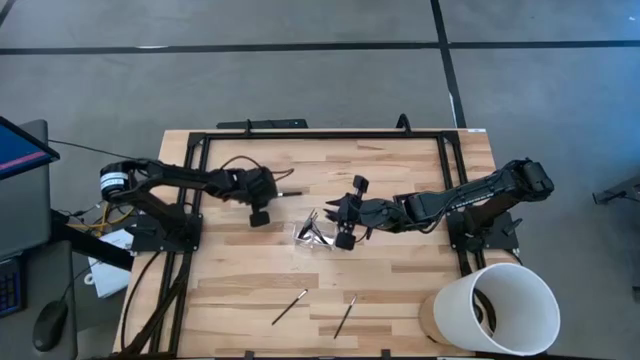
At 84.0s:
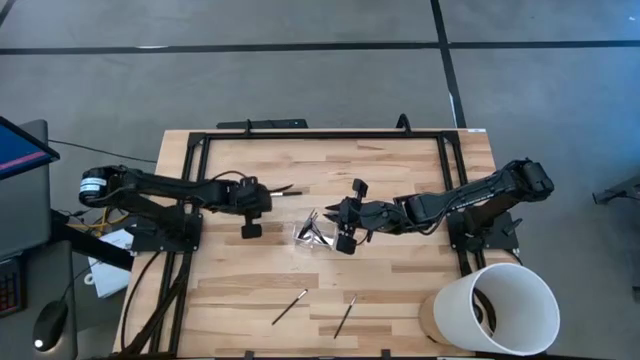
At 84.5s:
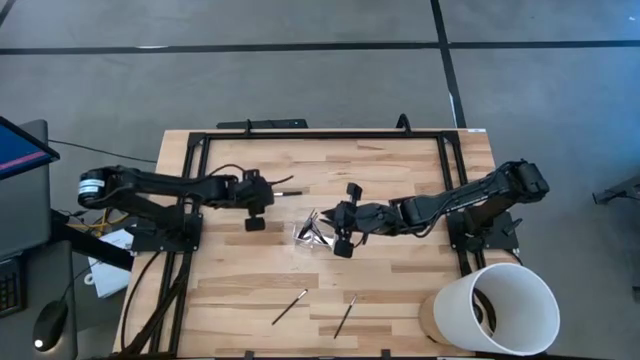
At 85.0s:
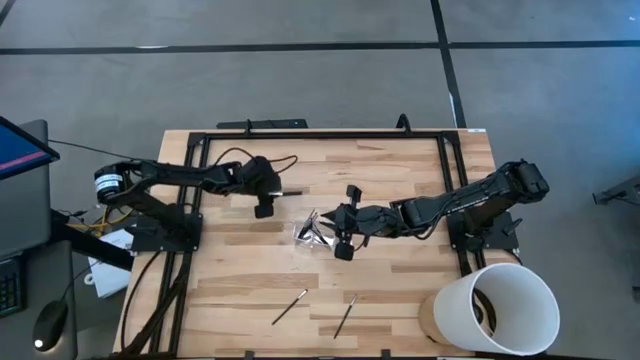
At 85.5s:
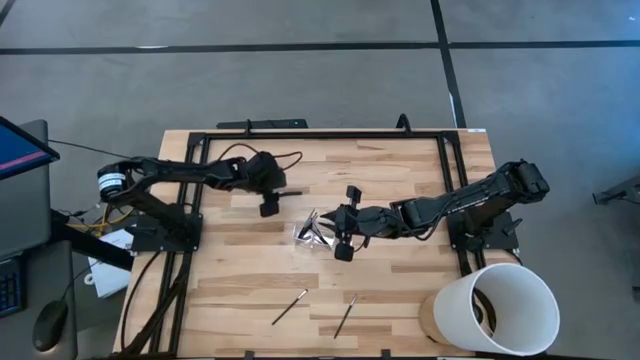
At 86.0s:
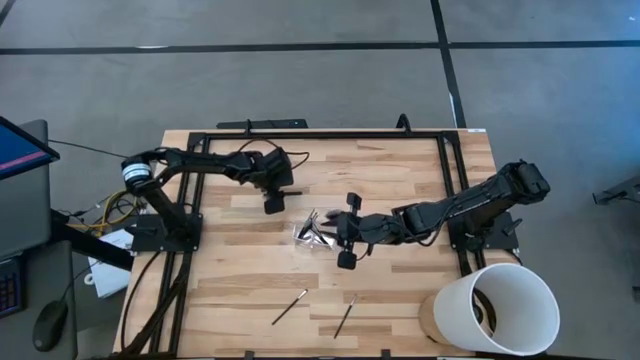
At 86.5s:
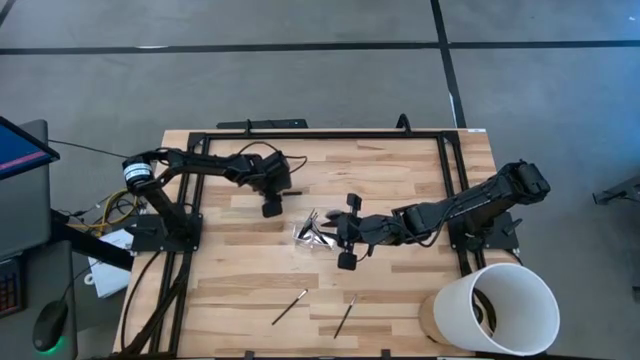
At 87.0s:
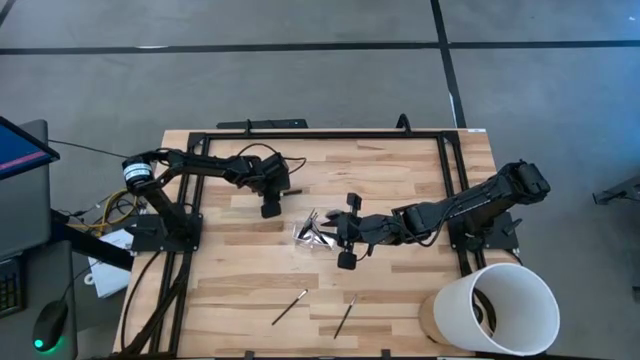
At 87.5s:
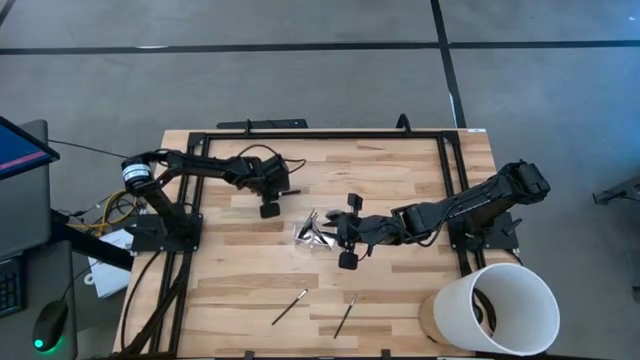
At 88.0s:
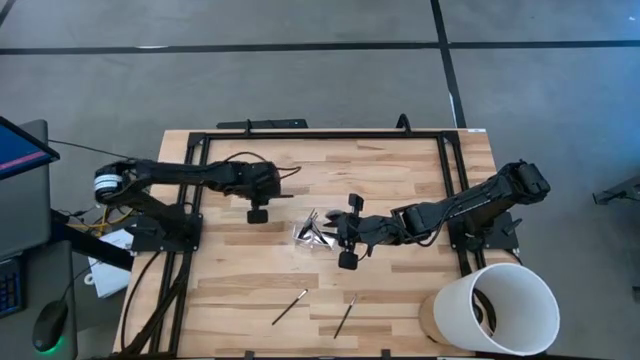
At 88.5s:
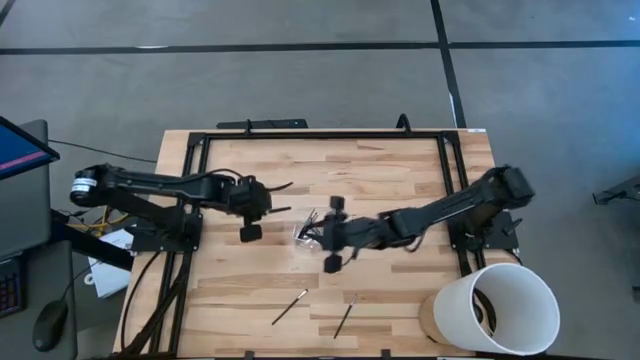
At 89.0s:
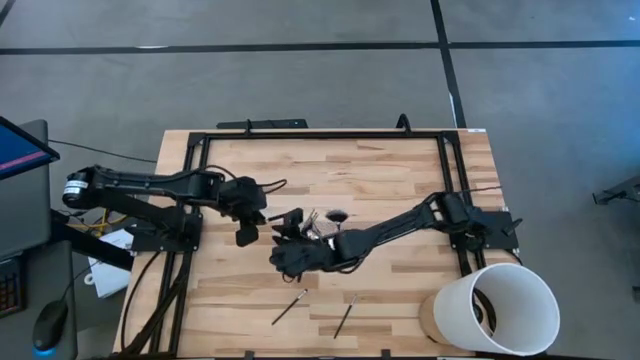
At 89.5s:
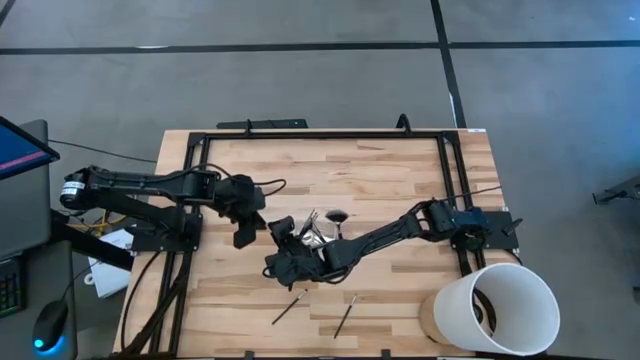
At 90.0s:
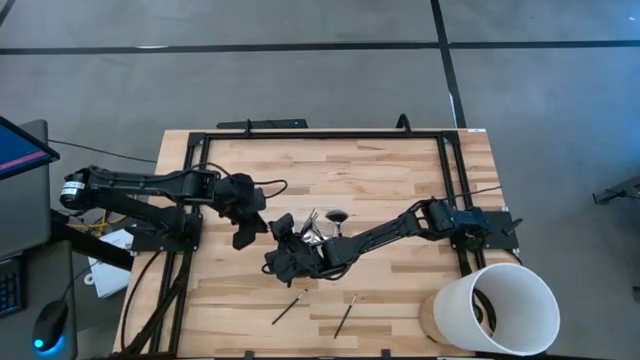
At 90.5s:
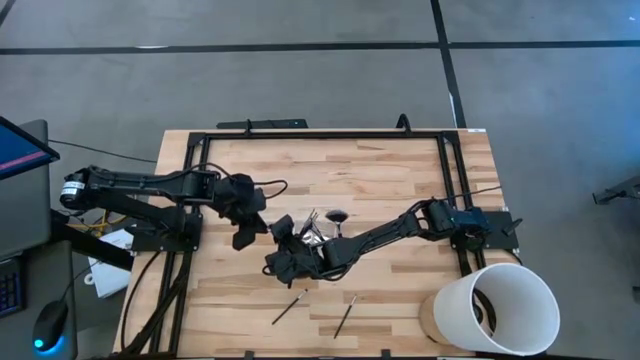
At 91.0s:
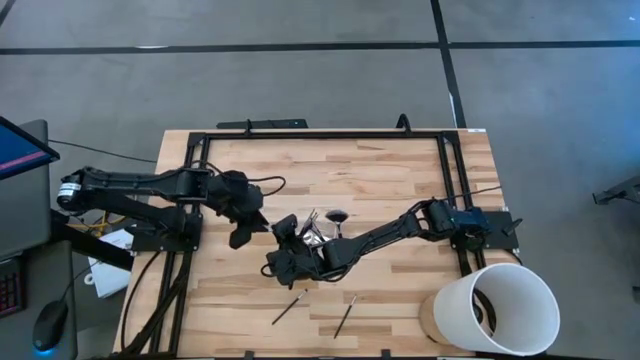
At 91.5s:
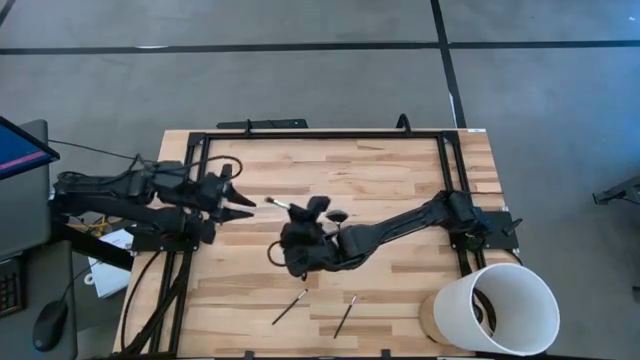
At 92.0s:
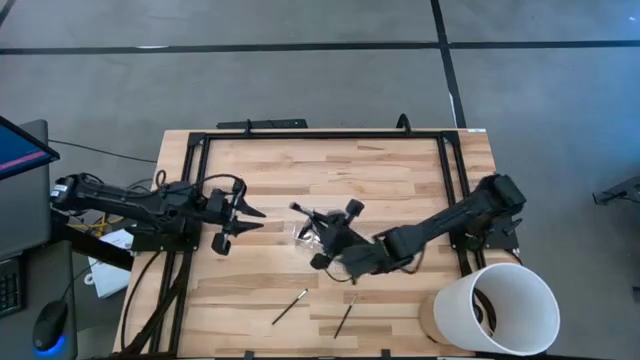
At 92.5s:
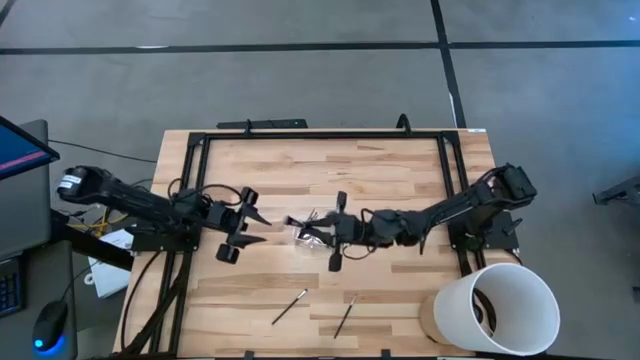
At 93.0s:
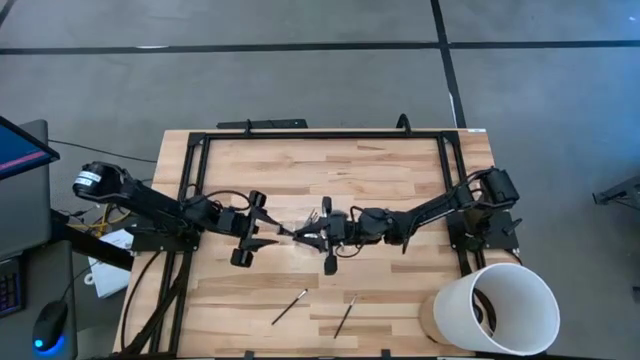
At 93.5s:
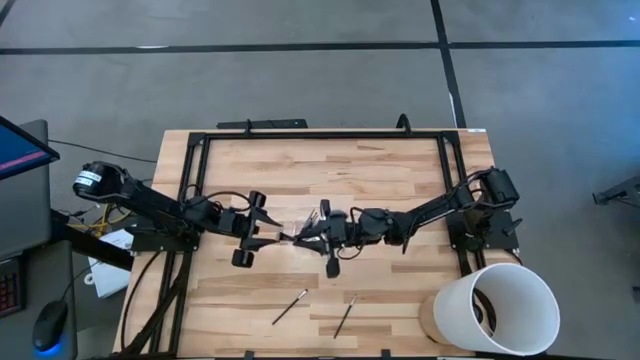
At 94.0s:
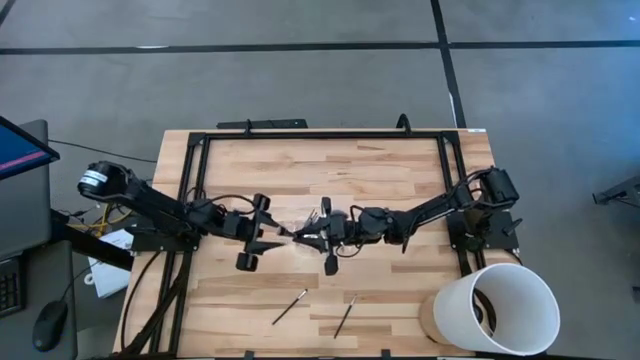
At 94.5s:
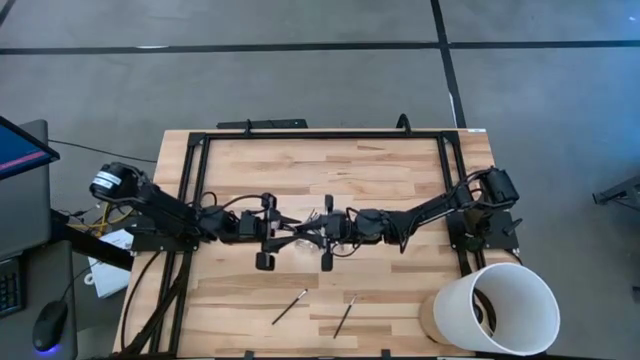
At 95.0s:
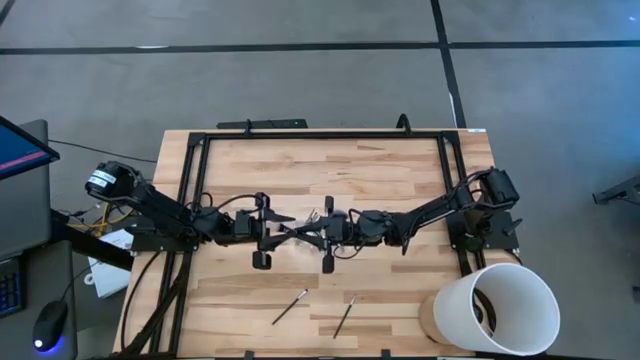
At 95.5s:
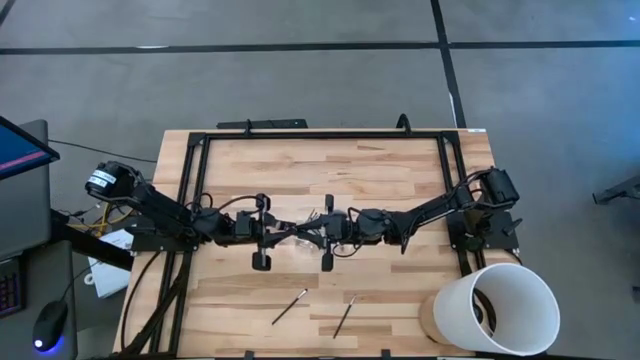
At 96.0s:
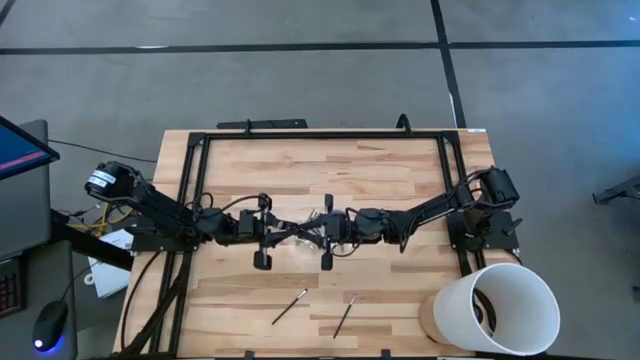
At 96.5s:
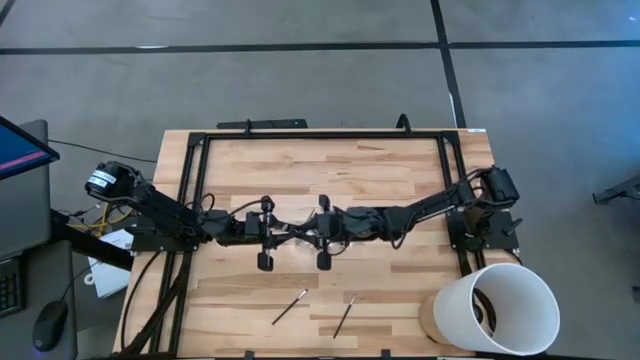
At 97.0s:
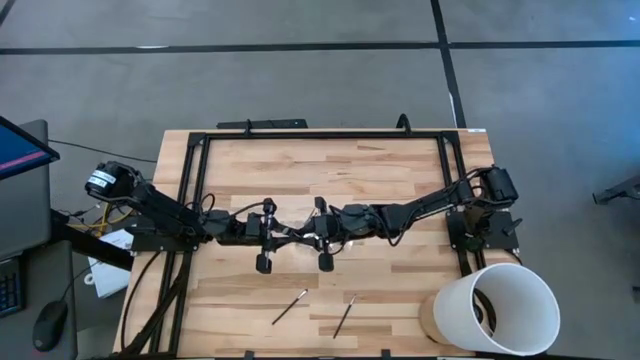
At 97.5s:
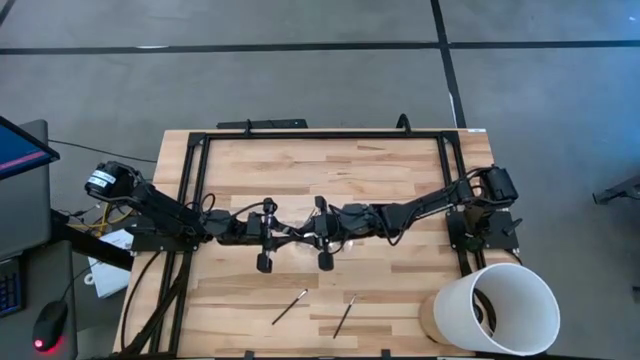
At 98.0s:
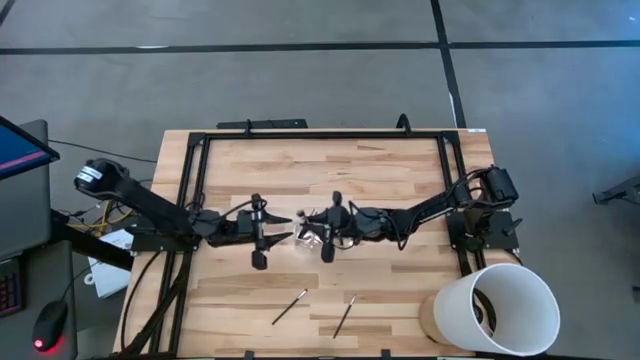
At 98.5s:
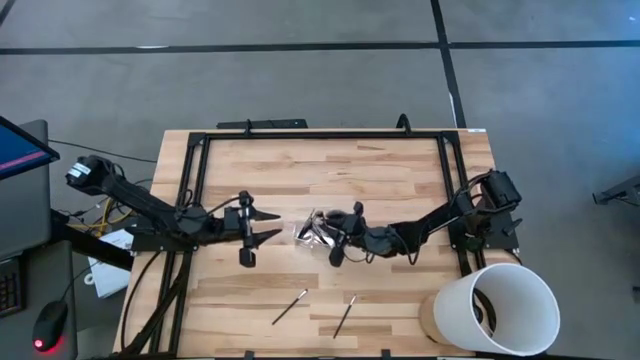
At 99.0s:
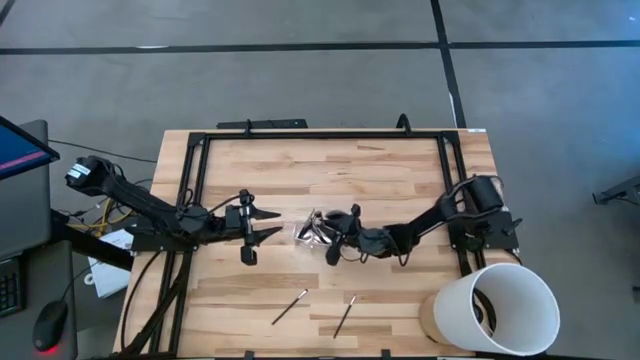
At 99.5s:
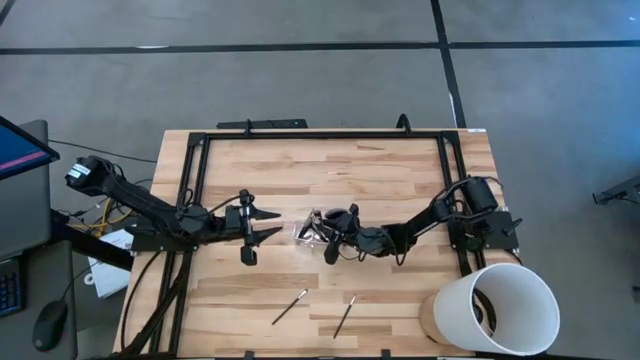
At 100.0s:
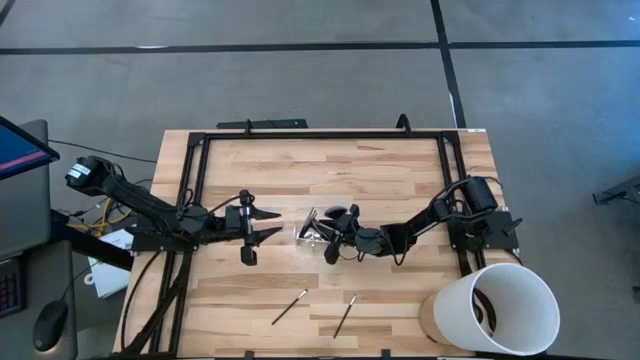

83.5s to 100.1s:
Task: Put items in baskets/containers
Put the powder brush into the middle section of the transparent organizer

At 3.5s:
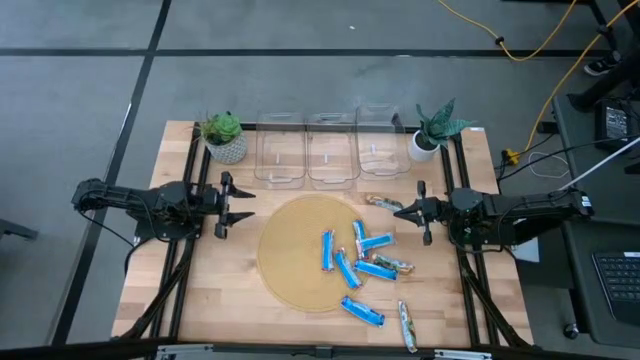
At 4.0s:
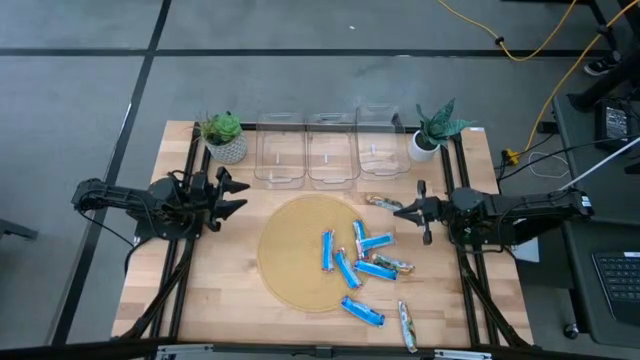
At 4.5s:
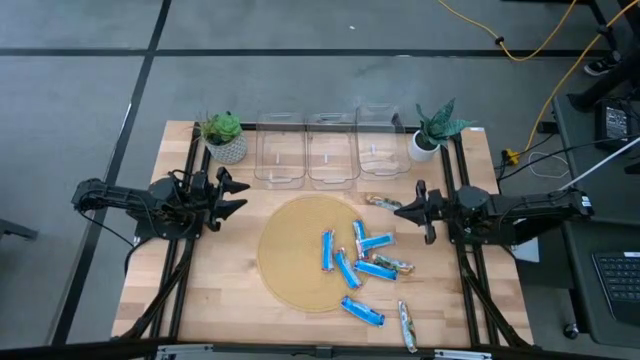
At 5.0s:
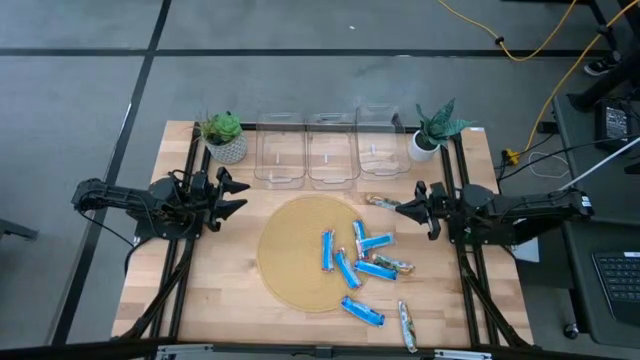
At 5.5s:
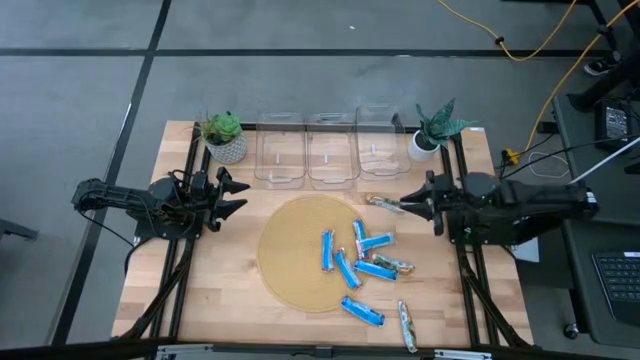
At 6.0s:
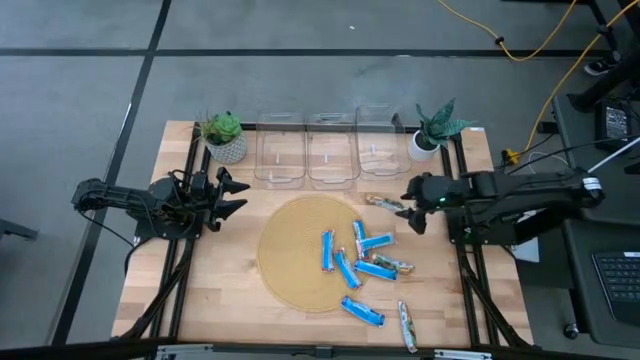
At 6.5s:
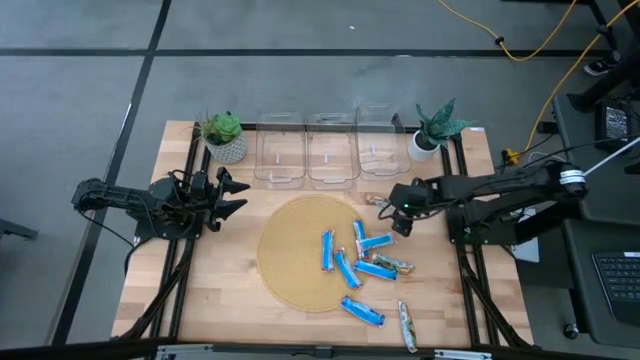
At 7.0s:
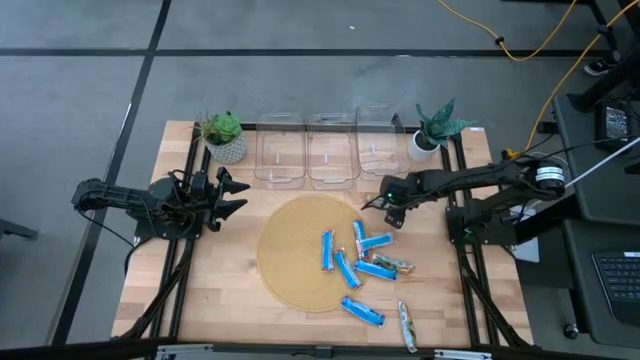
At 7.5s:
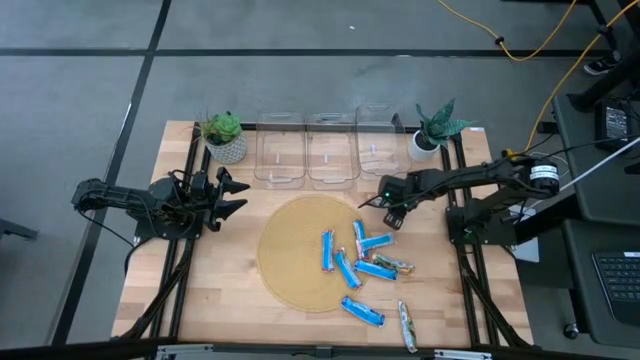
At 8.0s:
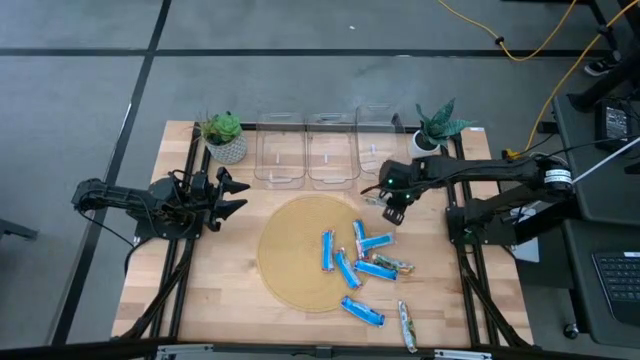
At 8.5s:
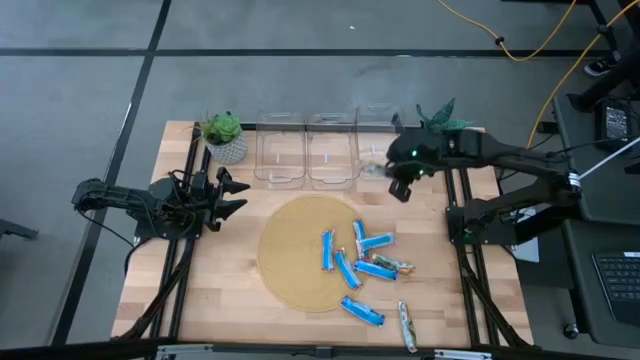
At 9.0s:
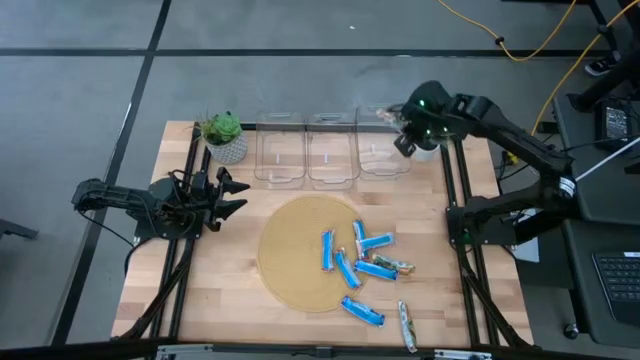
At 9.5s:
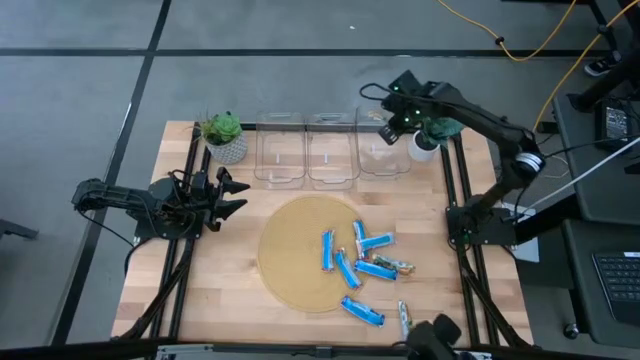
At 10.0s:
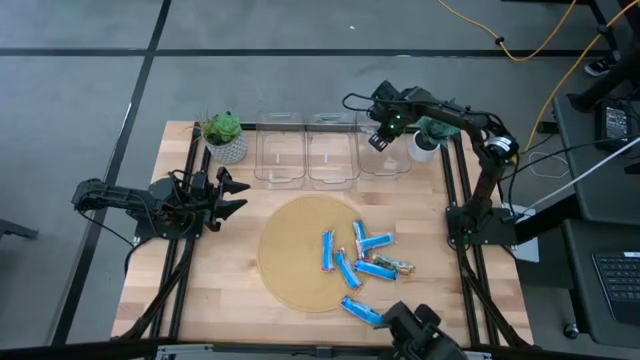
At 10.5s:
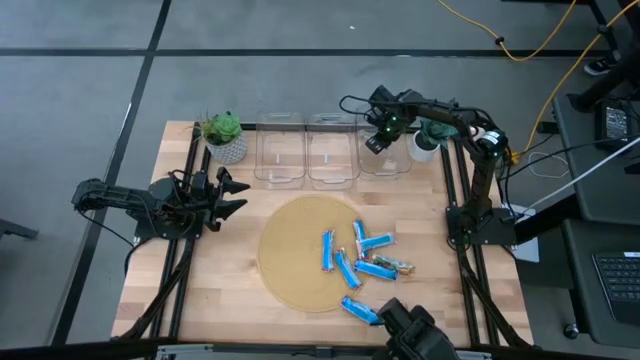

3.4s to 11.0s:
Task: Pick and place Granola Bars by type
Put the top yellow granola bar into the right transparent bin
